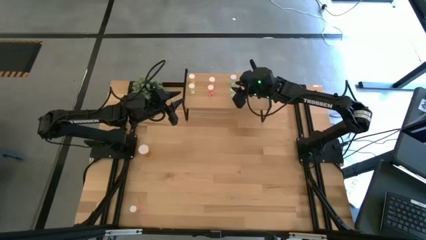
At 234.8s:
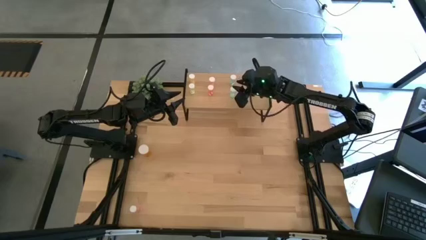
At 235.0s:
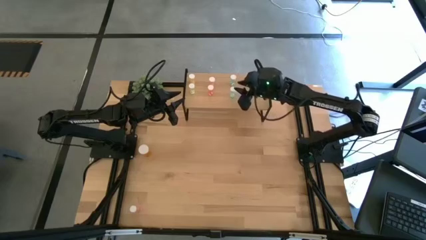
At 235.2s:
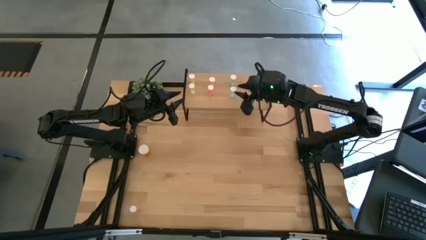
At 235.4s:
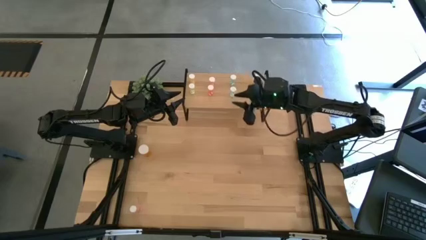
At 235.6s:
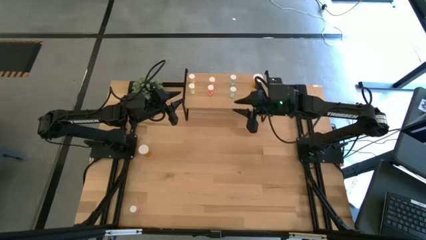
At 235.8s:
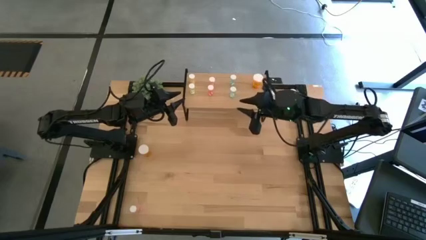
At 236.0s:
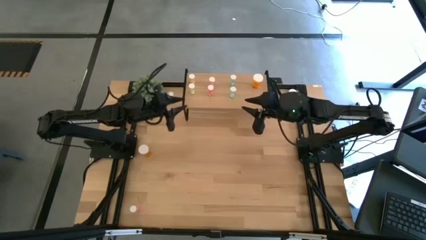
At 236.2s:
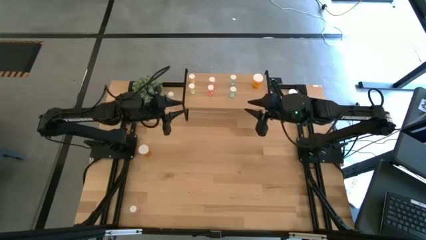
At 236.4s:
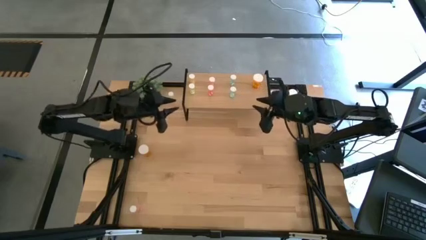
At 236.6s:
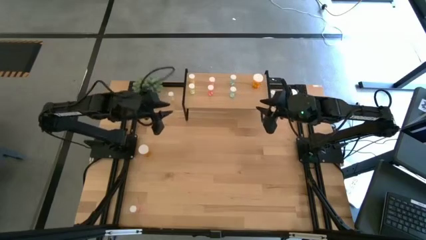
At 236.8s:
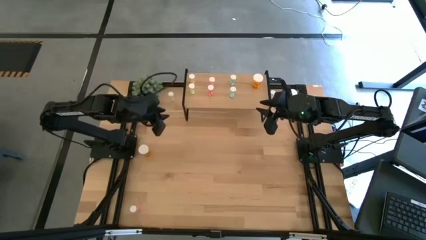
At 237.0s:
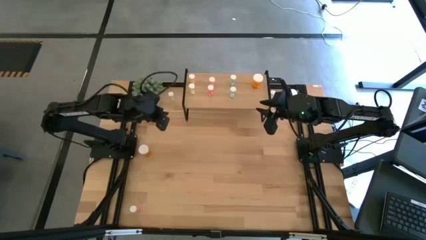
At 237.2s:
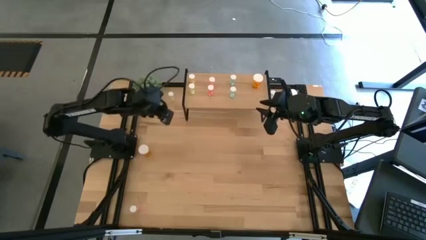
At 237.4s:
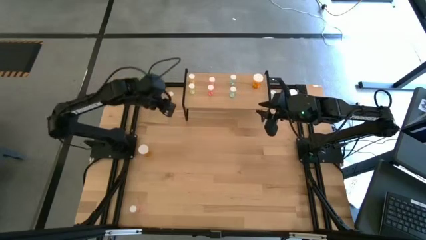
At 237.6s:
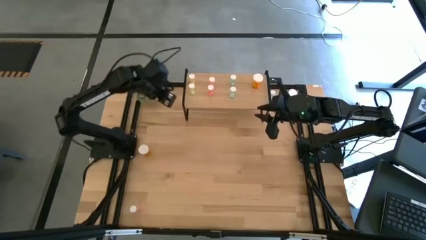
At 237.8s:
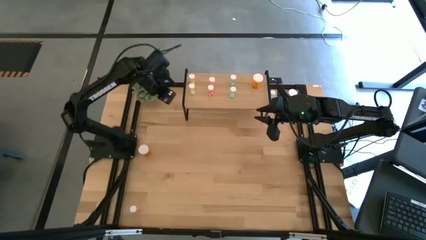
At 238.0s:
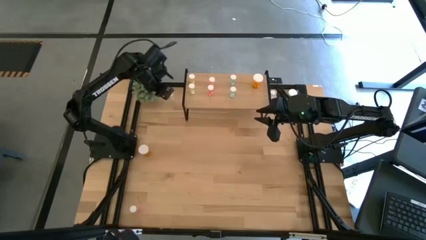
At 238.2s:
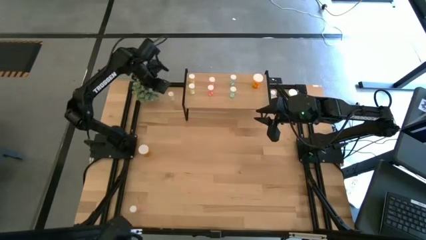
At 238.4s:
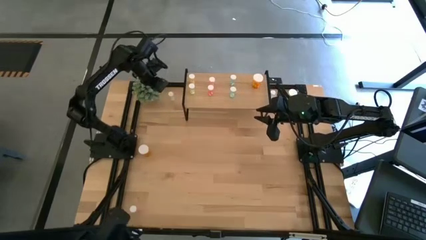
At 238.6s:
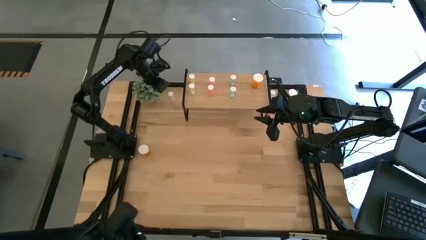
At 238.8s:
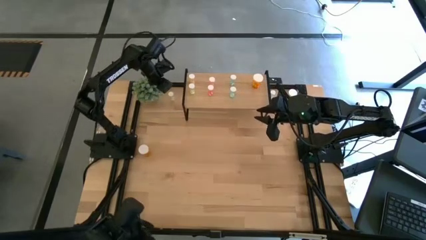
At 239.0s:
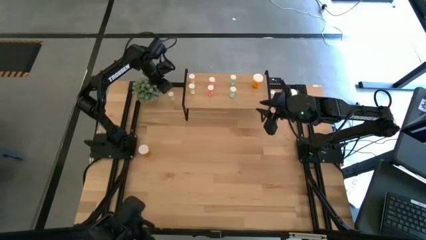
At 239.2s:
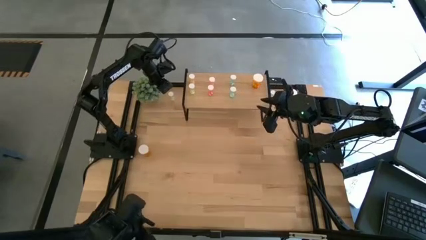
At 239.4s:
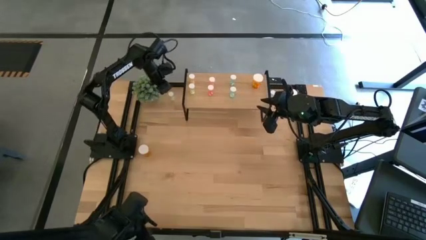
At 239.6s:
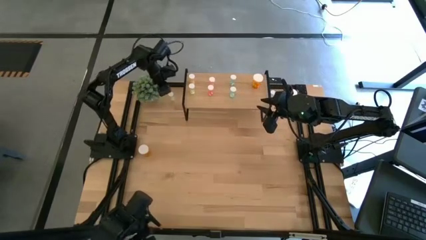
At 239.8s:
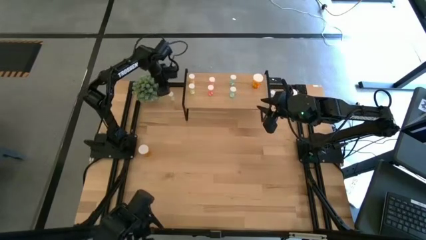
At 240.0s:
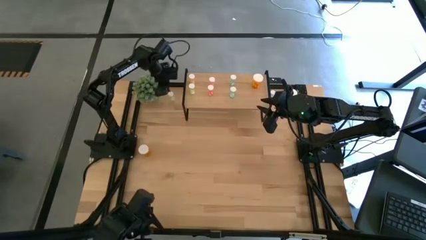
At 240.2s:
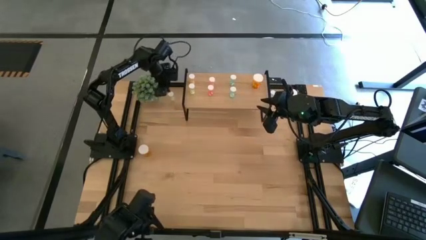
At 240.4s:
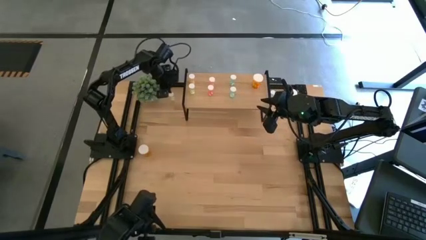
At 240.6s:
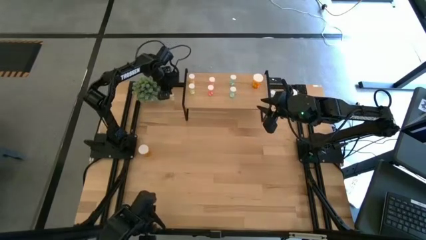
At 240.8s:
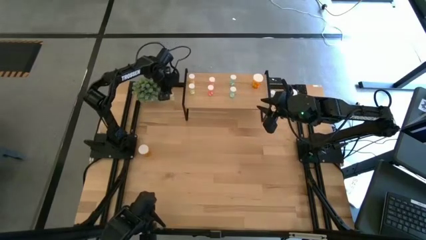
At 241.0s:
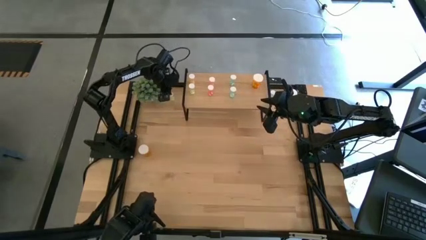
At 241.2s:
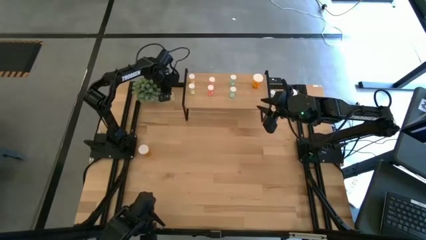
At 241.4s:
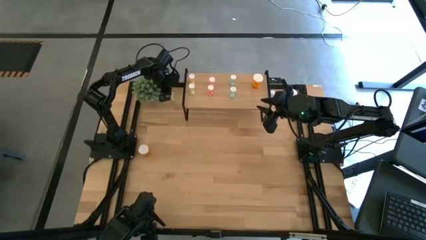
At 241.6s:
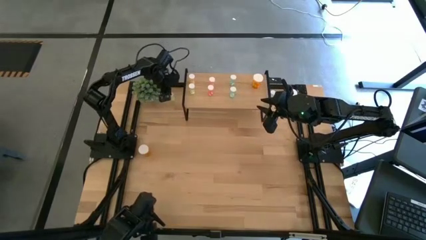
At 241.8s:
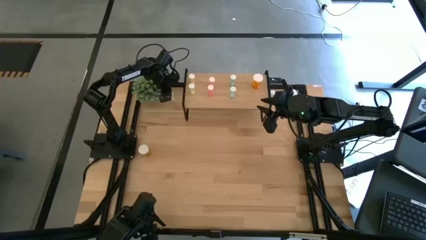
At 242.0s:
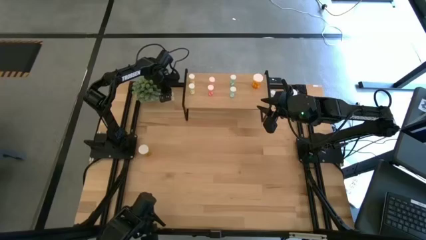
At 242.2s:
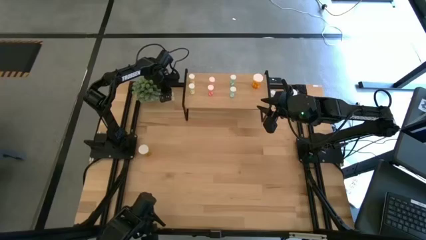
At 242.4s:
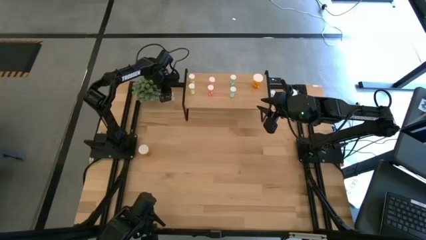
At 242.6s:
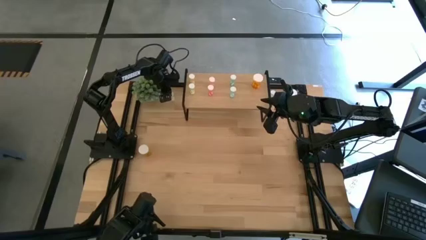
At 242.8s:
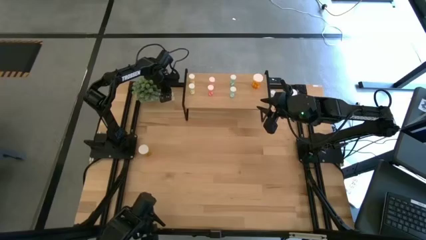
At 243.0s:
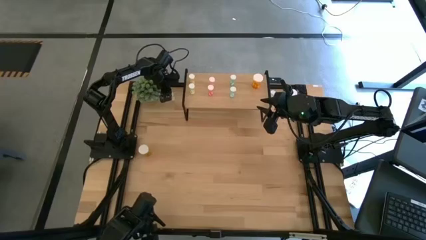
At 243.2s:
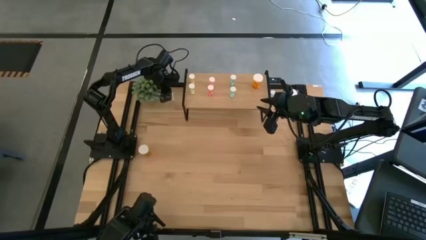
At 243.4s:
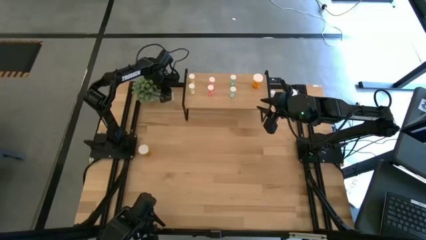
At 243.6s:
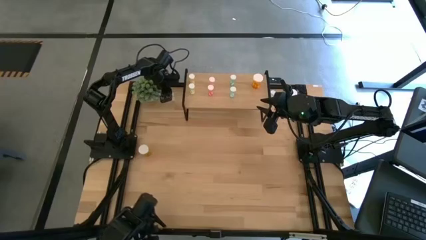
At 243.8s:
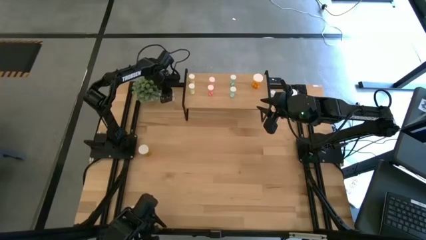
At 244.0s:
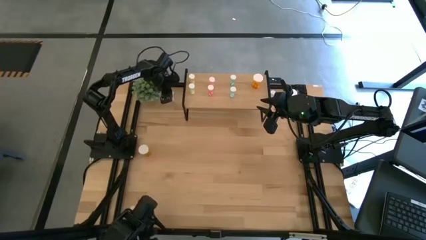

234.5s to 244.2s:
Task: Pick and place medicine bottles onto shelf by color
Put the yellow pill bottle on the shelf aligned with the other yellow pill bottles

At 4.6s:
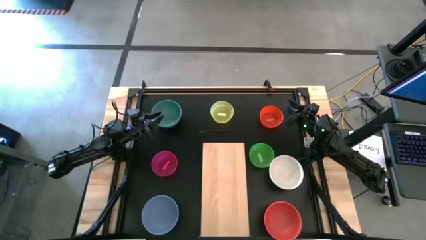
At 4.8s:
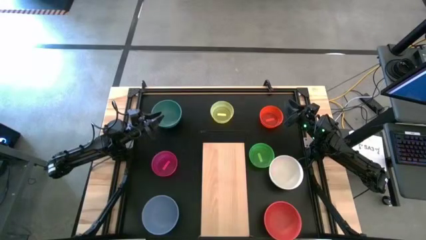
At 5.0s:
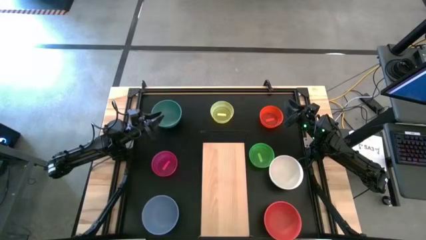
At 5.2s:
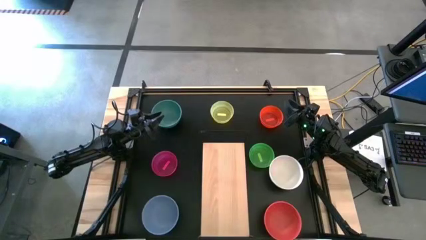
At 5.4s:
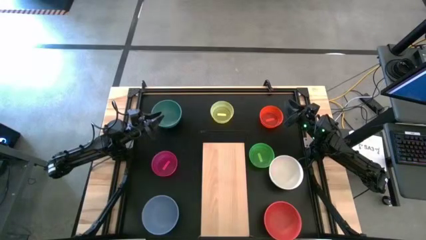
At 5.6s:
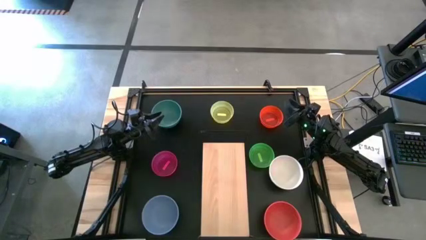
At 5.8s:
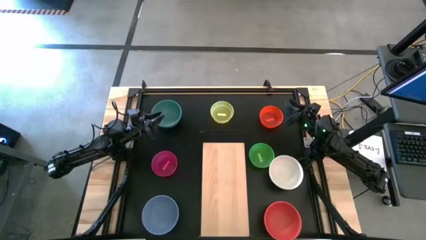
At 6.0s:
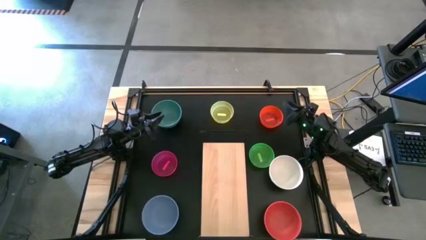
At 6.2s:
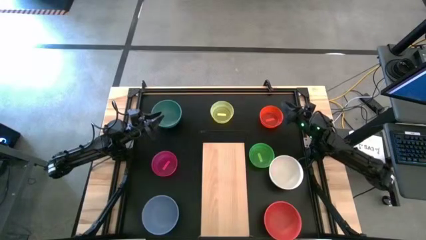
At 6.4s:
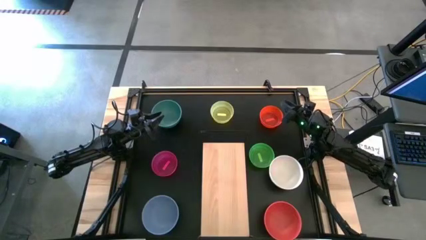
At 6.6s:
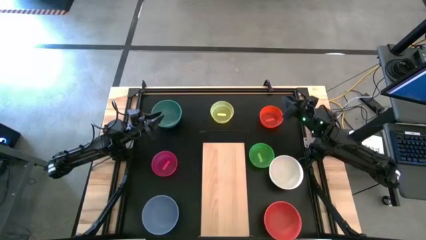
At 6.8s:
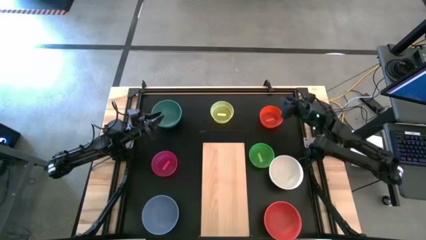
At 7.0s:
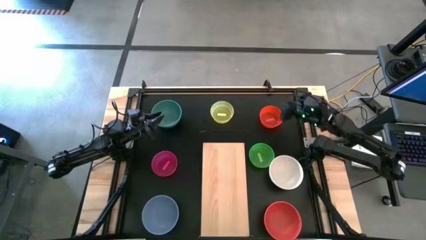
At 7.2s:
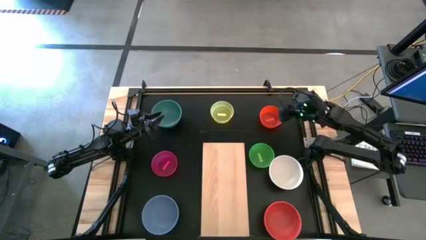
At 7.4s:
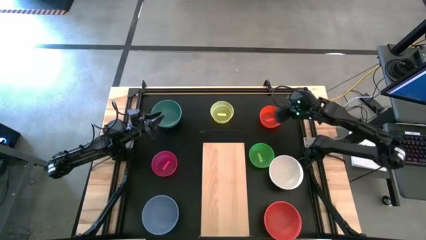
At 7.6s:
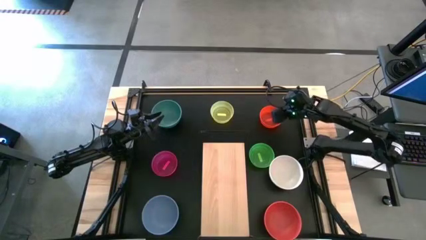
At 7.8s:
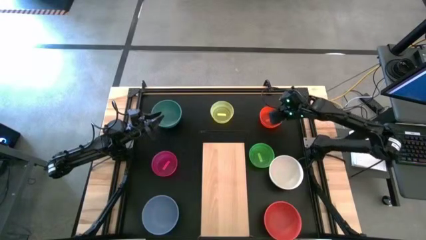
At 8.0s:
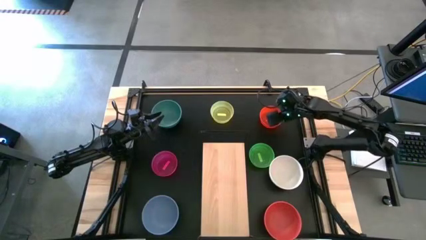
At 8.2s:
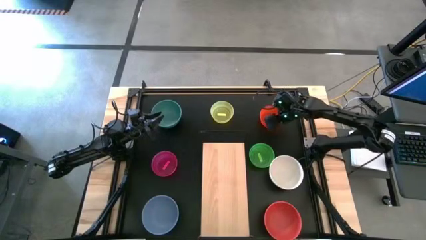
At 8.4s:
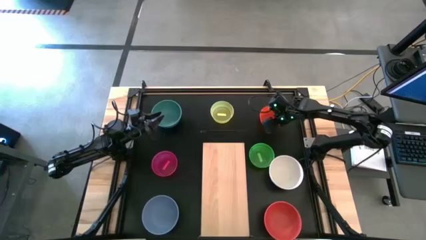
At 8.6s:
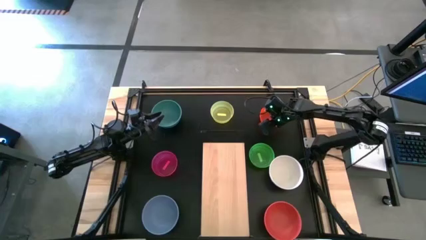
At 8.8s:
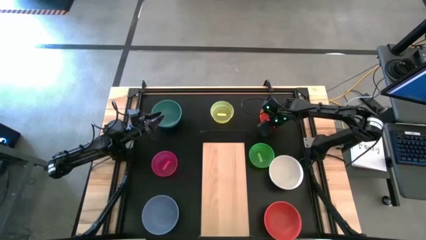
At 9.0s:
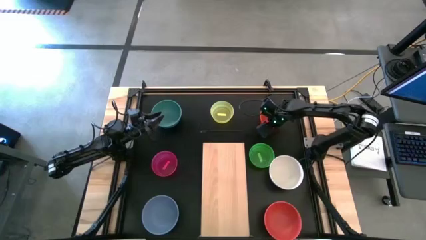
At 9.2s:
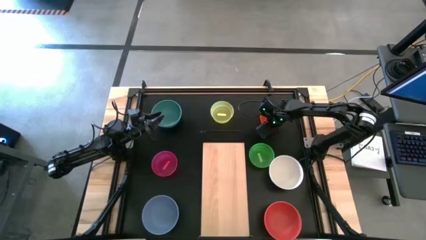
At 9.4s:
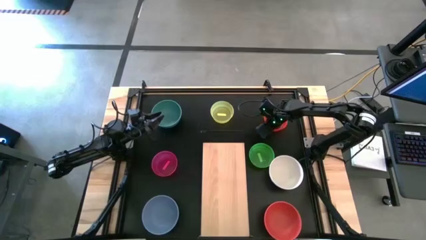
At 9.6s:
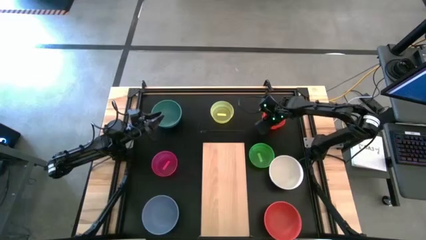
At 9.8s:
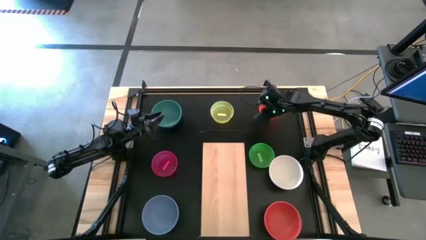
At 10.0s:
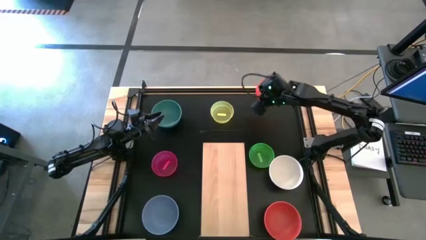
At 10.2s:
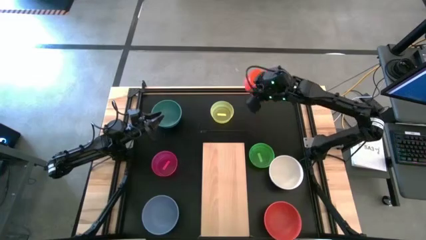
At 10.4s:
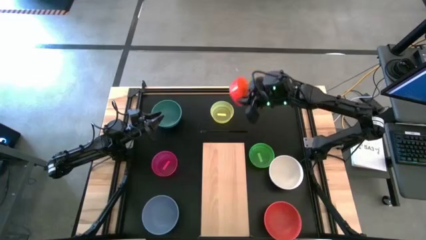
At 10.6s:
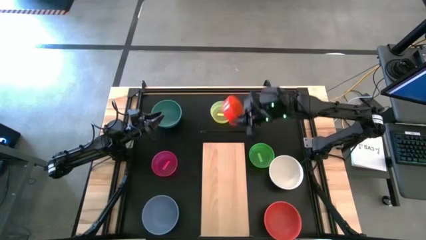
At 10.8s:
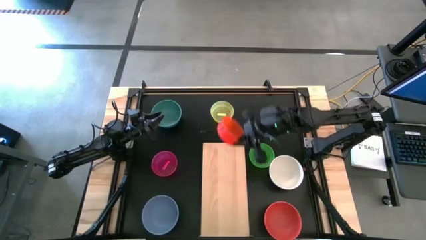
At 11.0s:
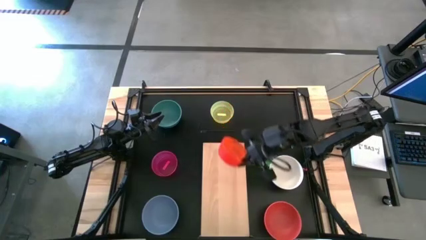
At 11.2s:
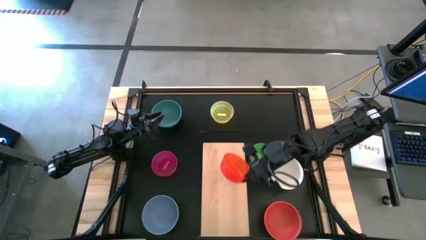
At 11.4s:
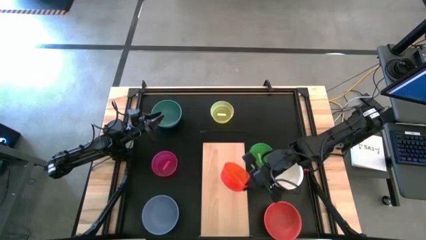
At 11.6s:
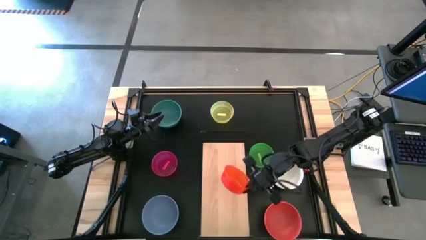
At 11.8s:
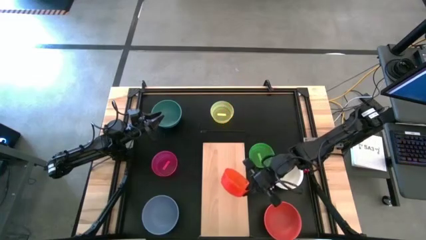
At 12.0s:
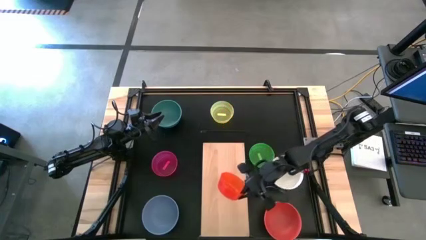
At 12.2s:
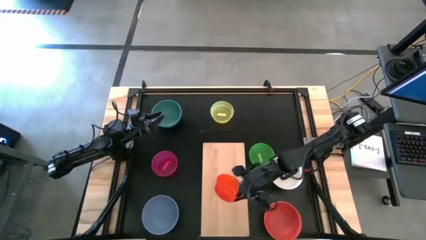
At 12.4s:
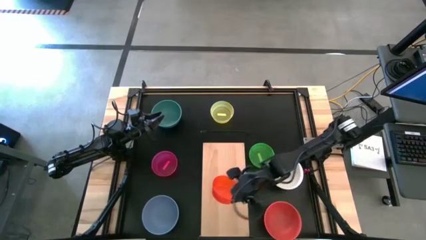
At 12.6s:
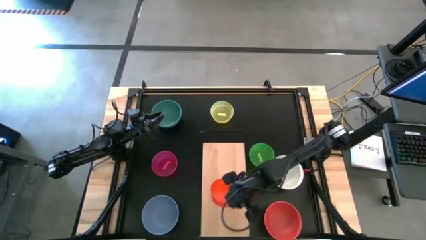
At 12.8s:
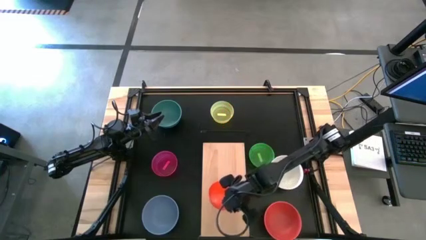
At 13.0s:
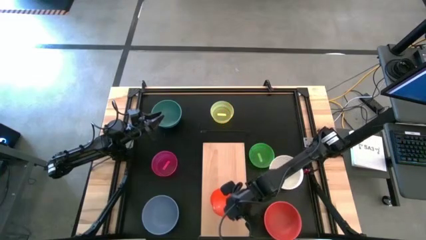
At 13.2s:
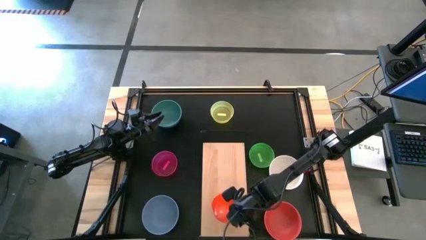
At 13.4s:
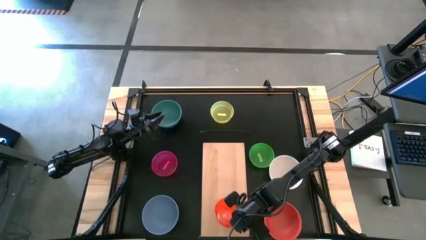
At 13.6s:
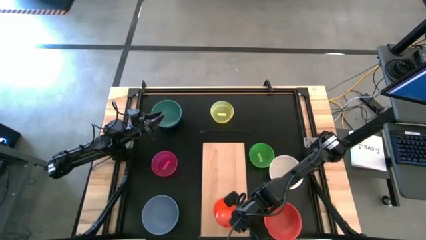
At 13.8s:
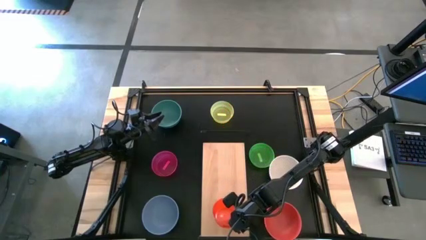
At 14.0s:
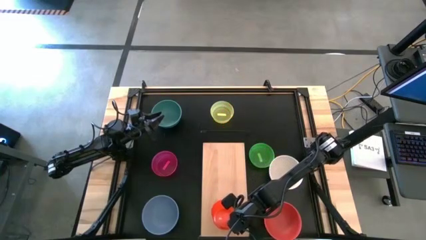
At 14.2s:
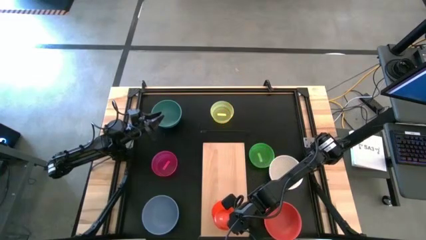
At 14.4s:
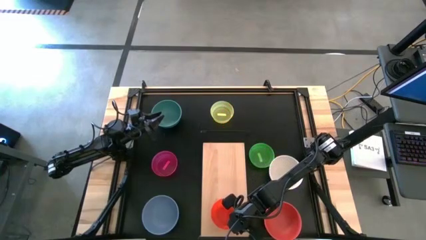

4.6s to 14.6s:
Task: Place and stack bowls onto a shelf
Put the small orange bowl on the shelf
